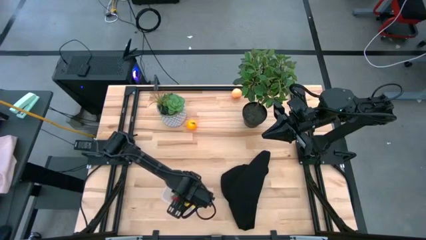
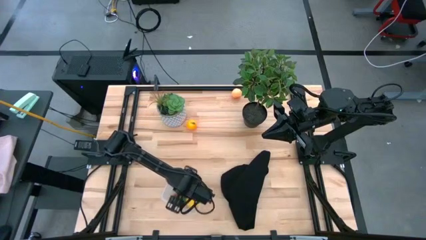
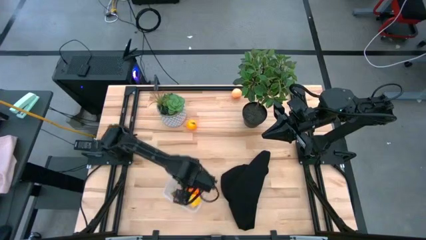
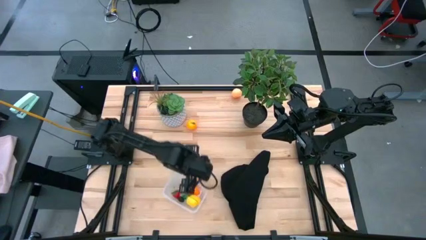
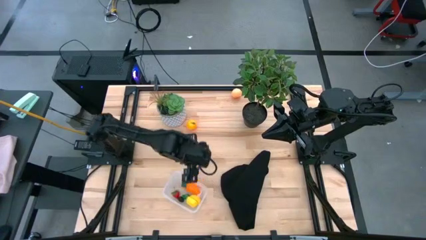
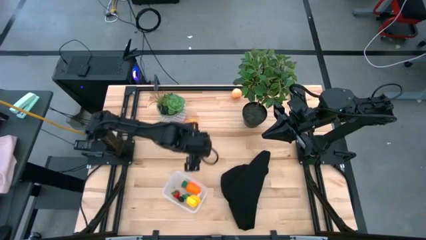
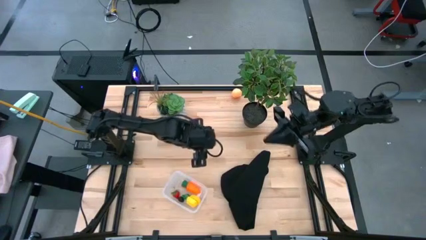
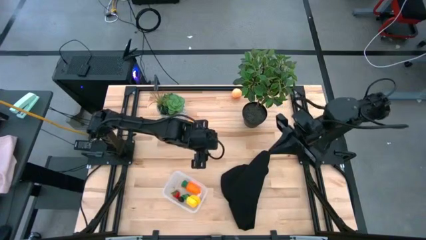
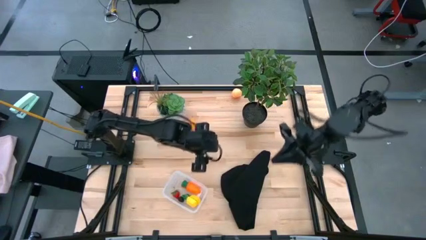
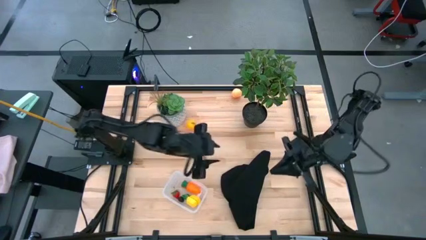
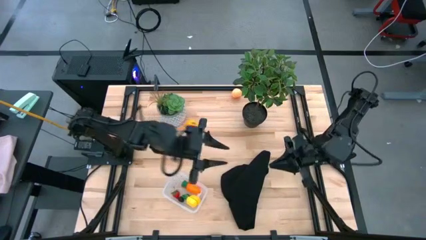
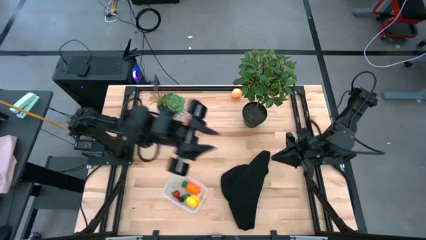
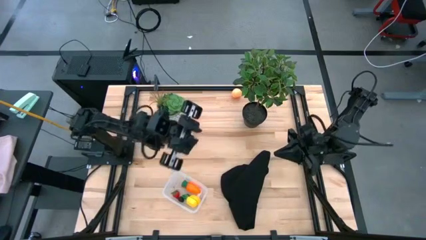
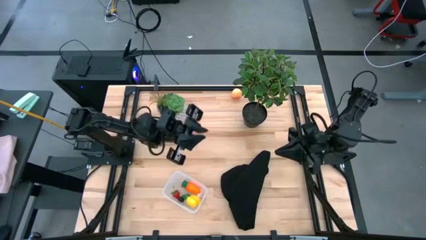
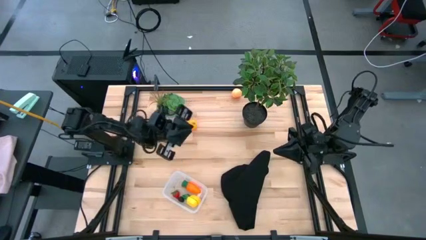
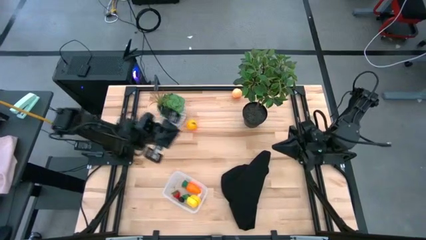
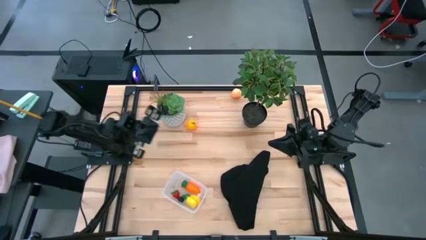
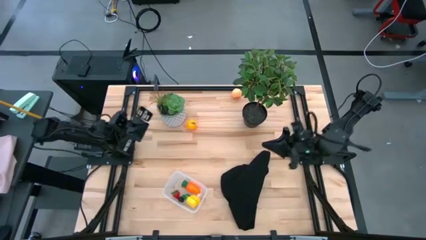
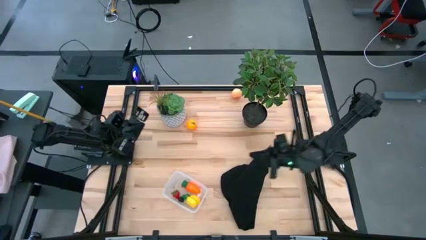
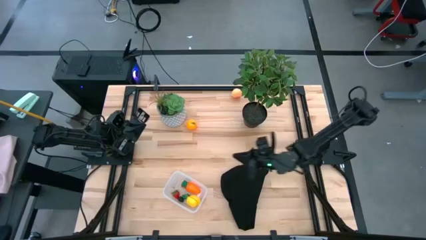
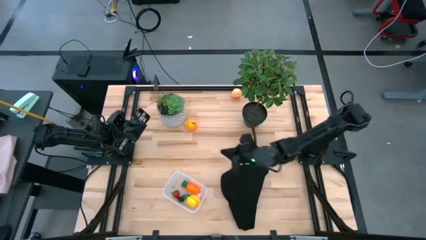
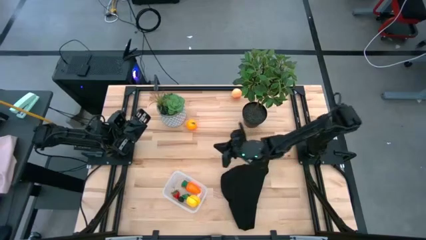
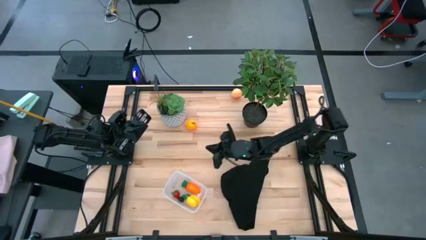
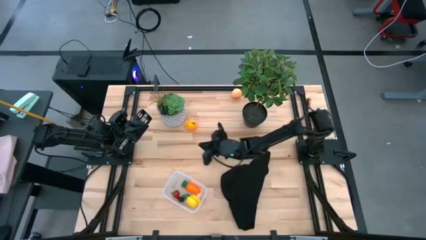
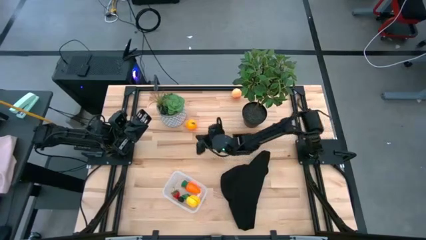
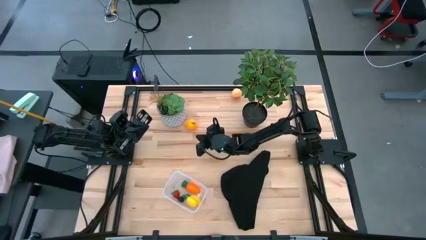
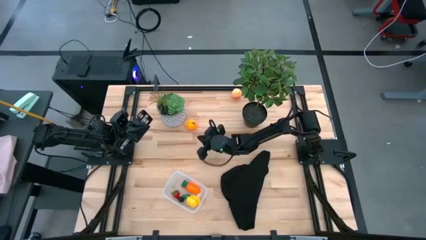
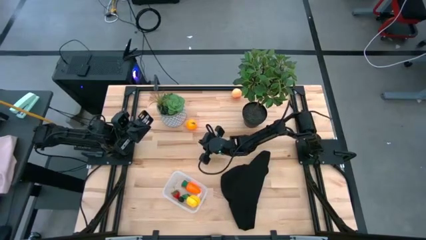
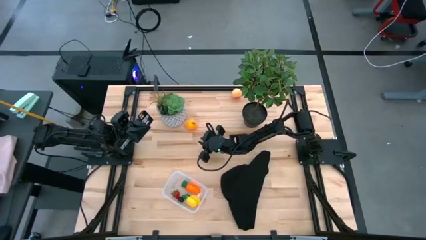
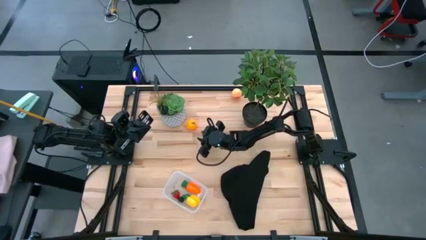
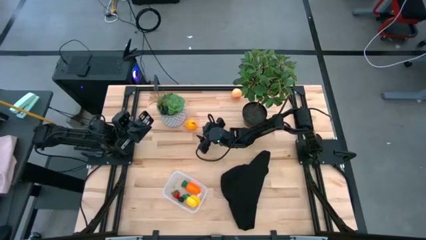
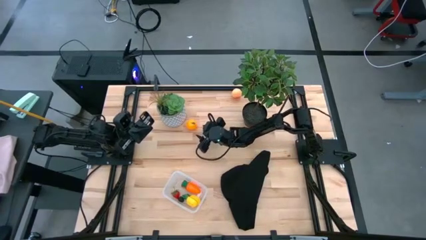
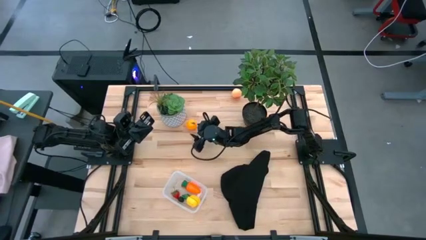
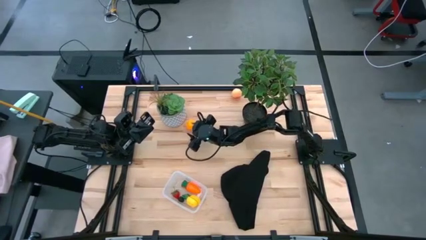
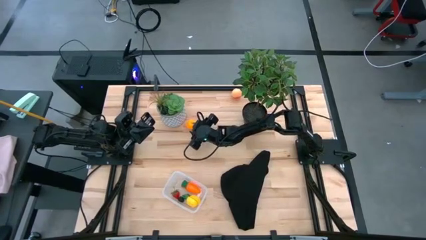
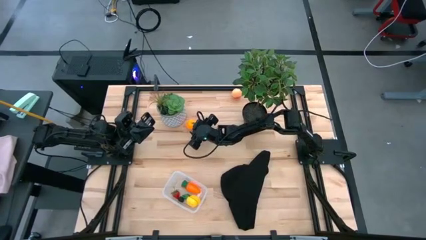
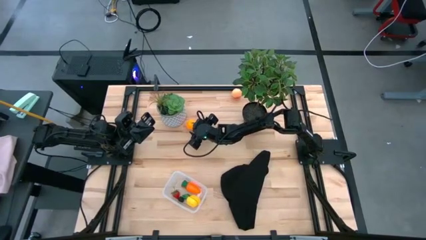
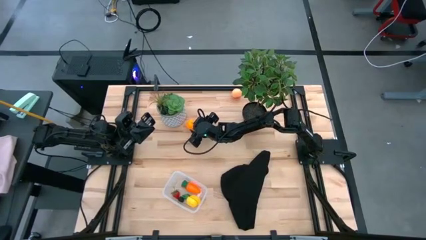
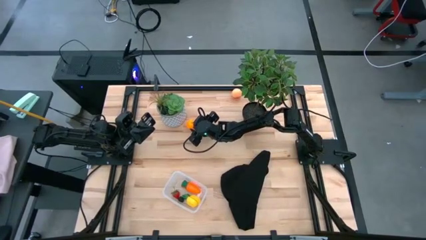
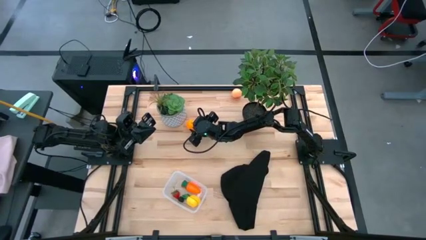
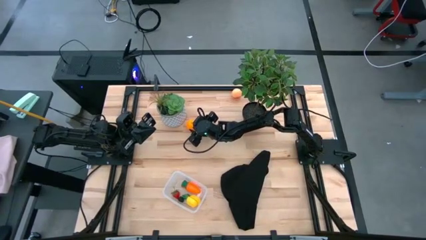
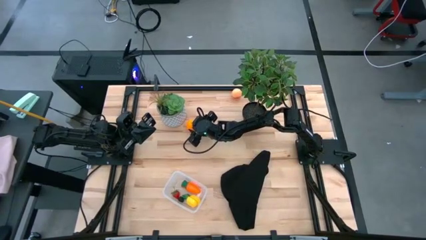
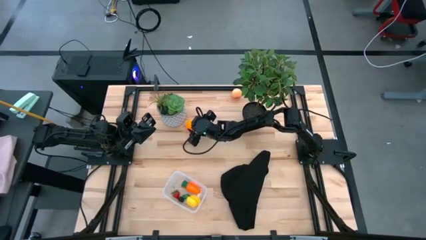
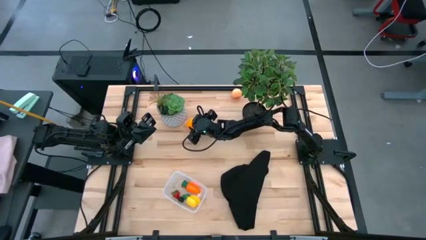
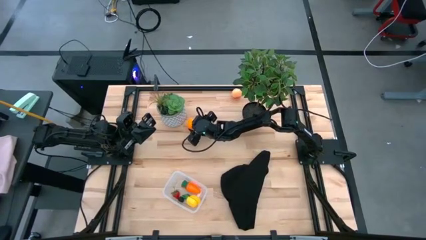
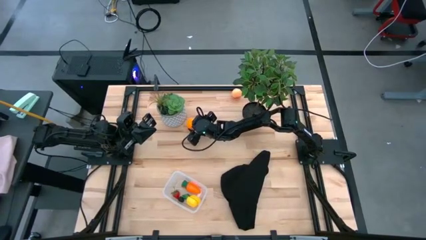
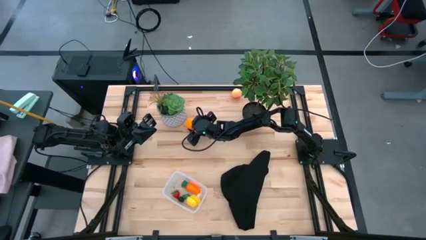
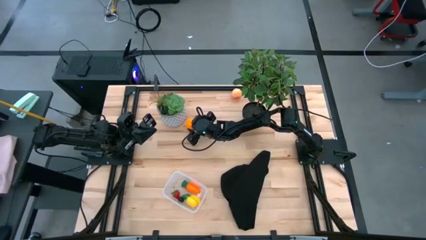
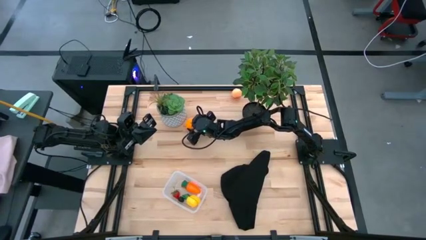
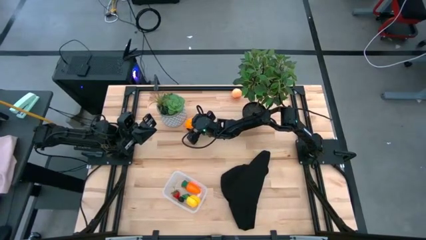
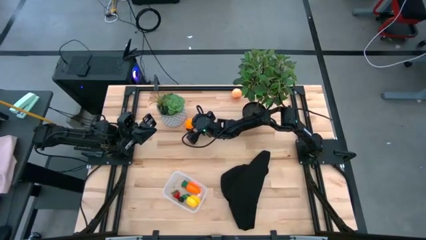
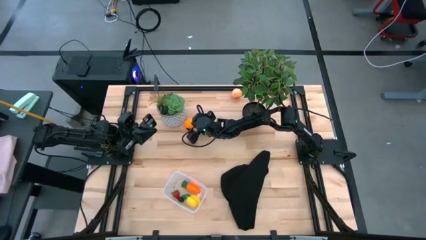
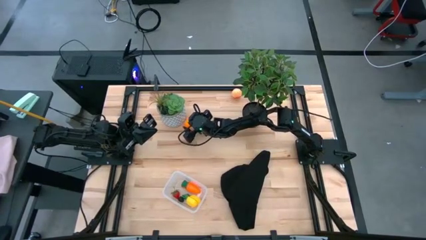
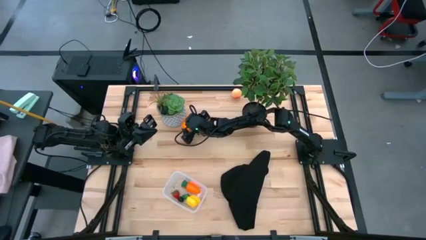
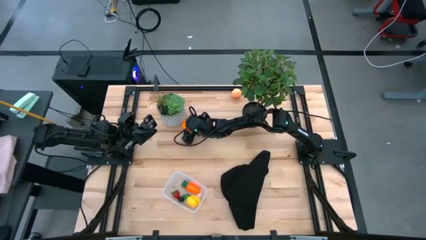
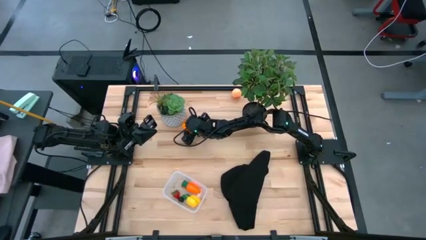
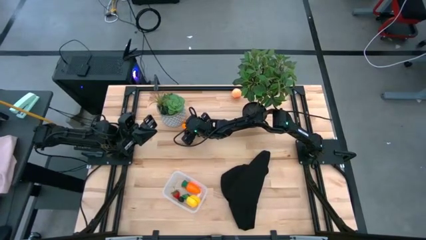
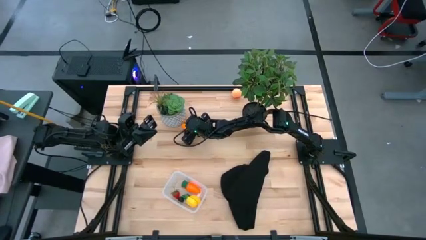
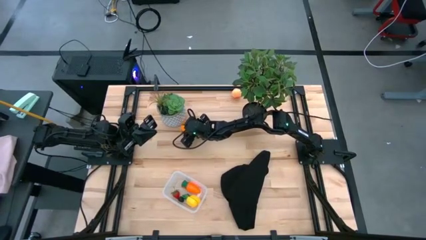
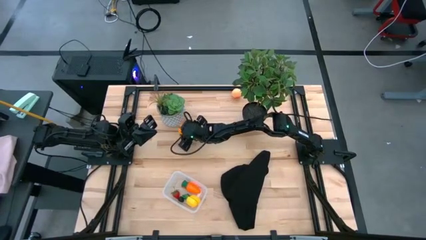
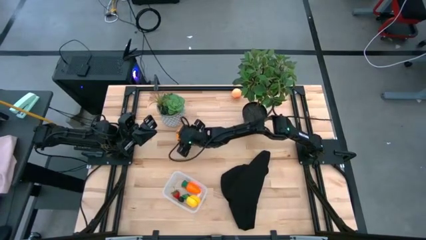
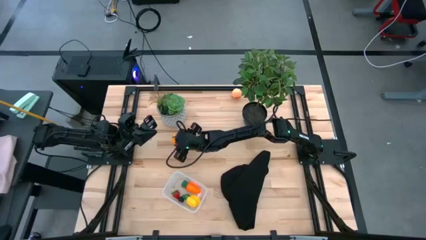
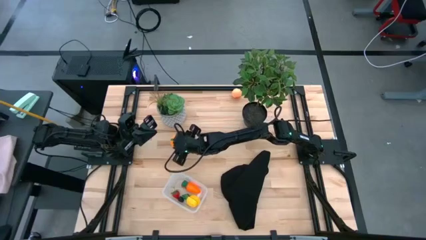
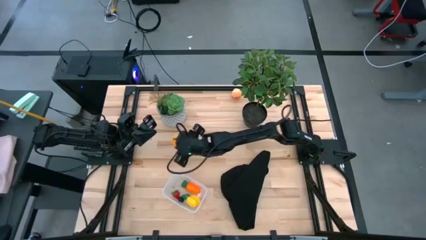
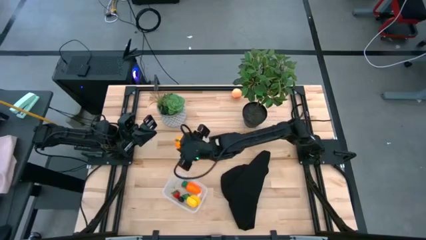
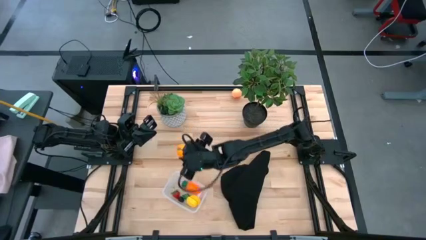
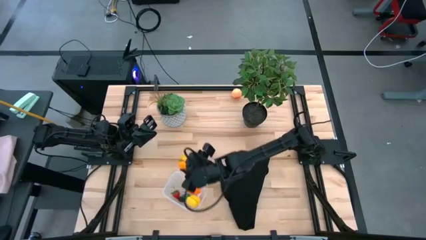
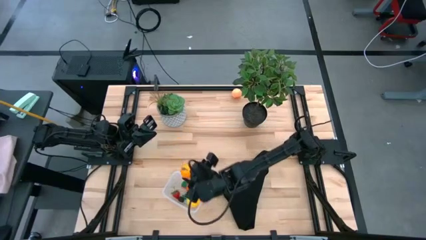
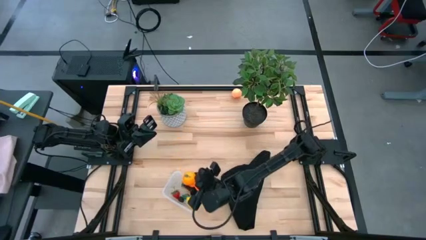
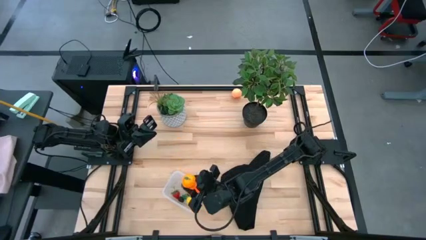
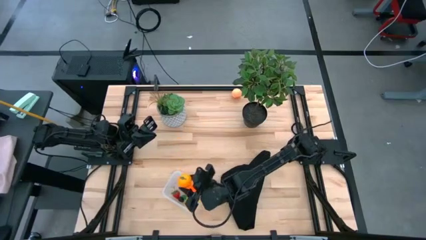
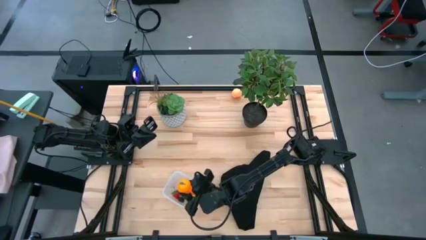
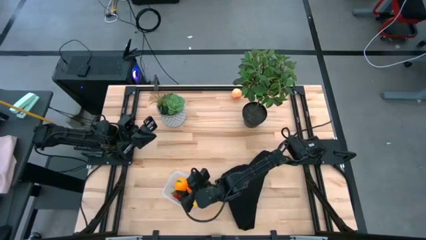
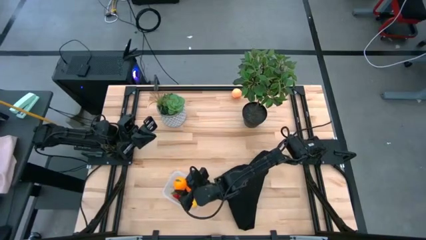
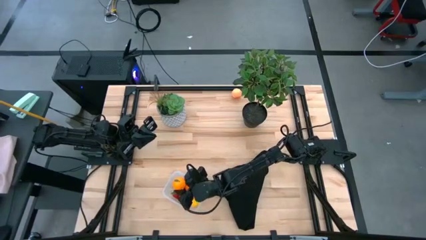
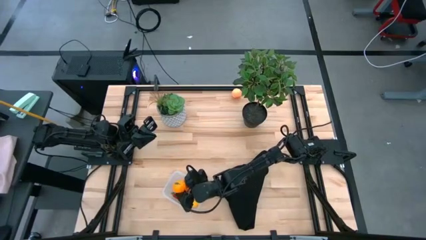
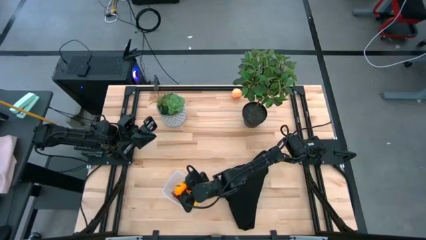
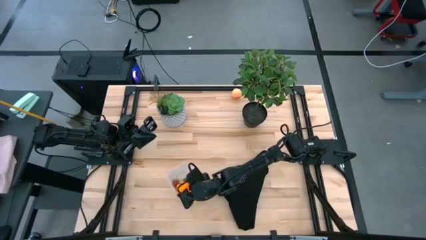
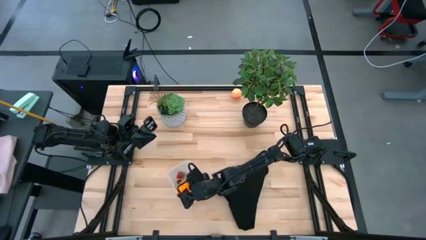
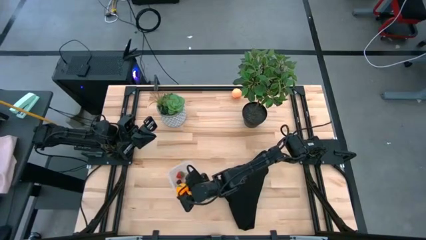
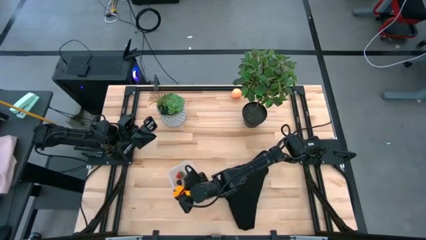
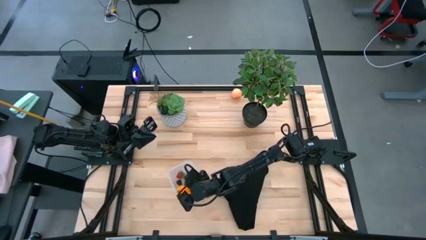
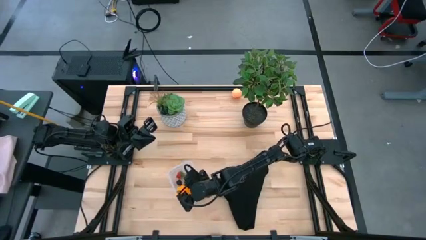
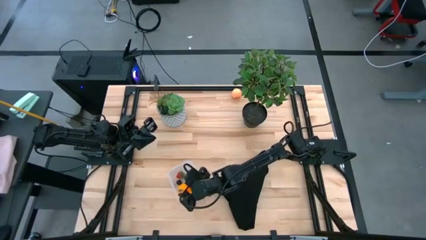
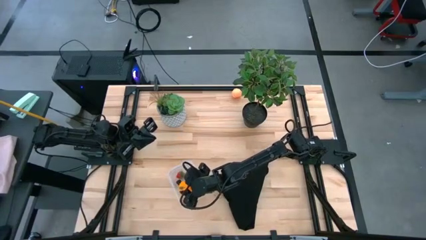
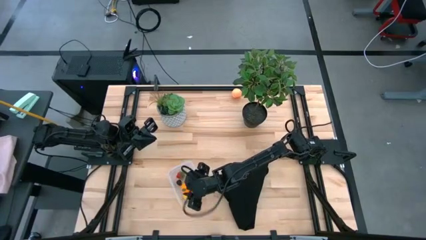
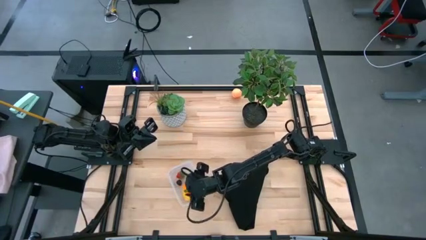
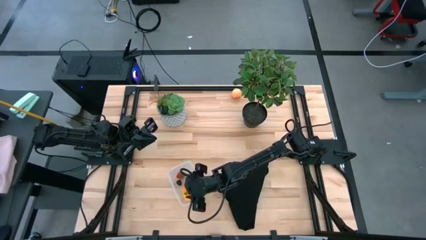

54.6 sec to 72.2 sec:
Task: Pick and placing Produce into tupperware
Put the orange into the transparent bin
